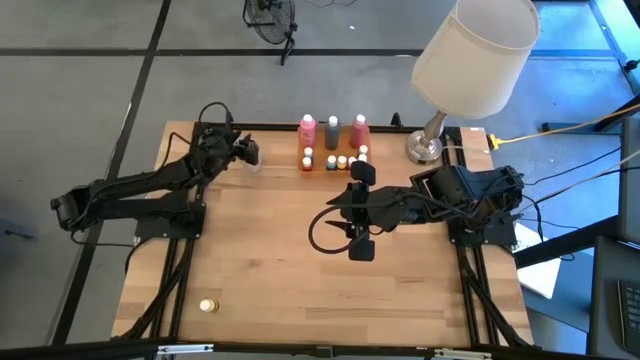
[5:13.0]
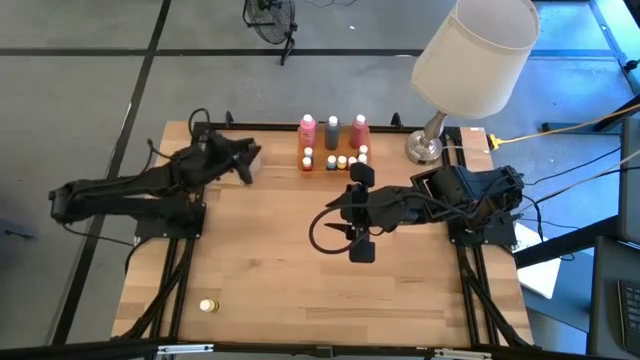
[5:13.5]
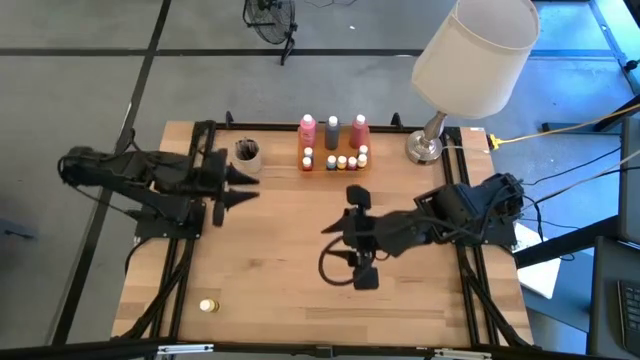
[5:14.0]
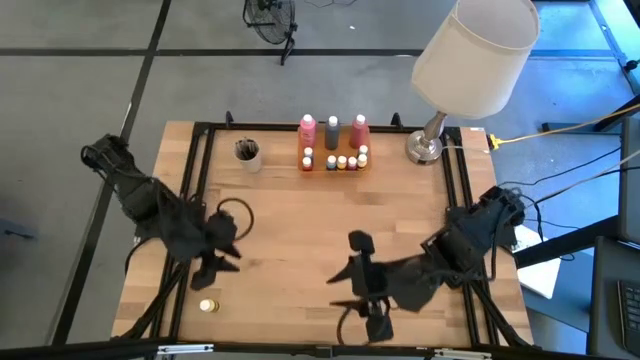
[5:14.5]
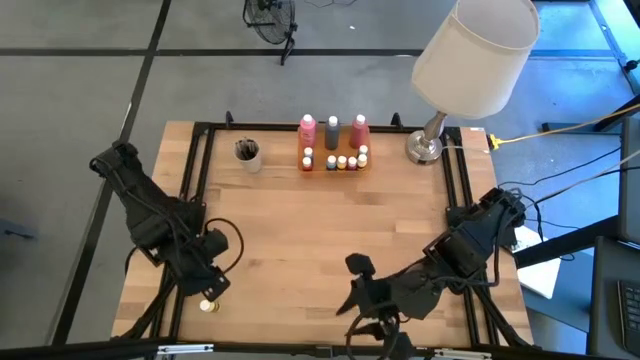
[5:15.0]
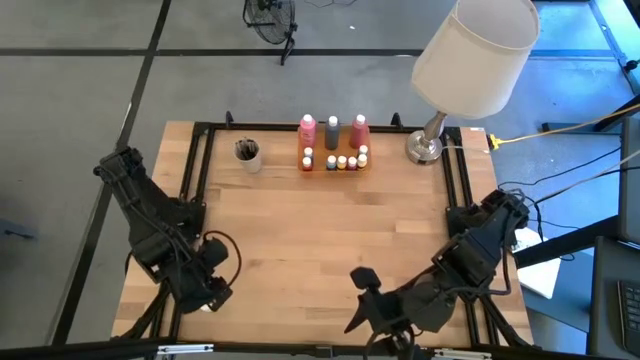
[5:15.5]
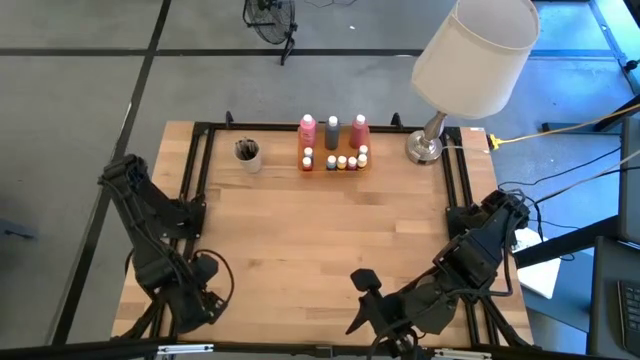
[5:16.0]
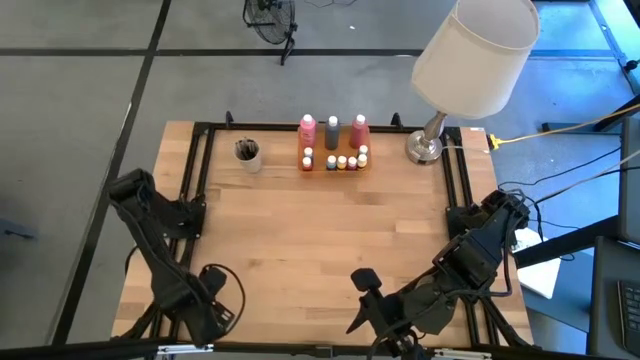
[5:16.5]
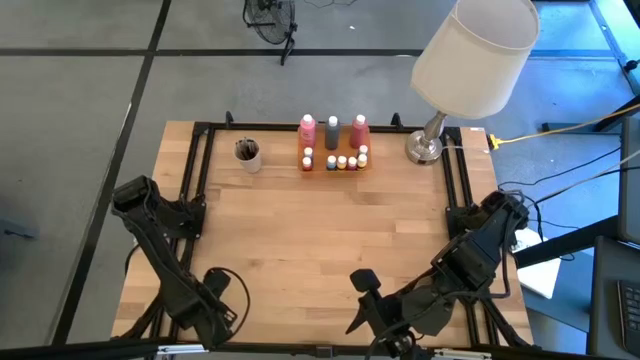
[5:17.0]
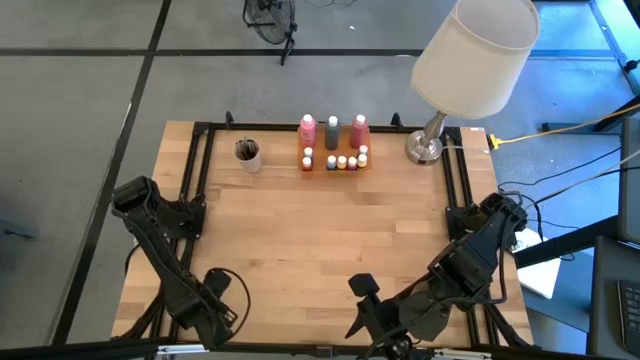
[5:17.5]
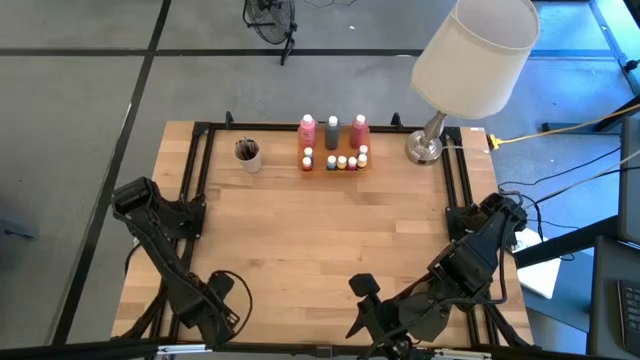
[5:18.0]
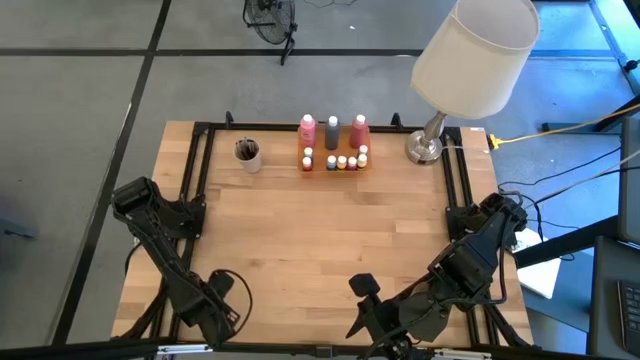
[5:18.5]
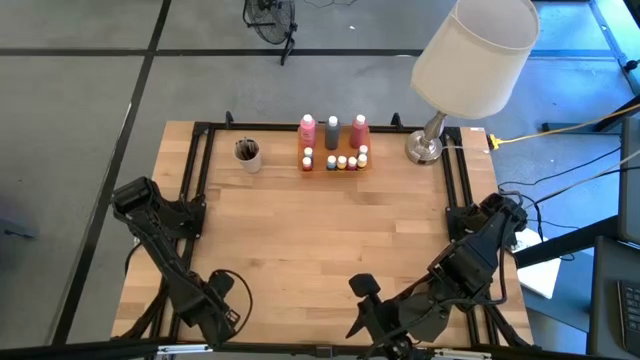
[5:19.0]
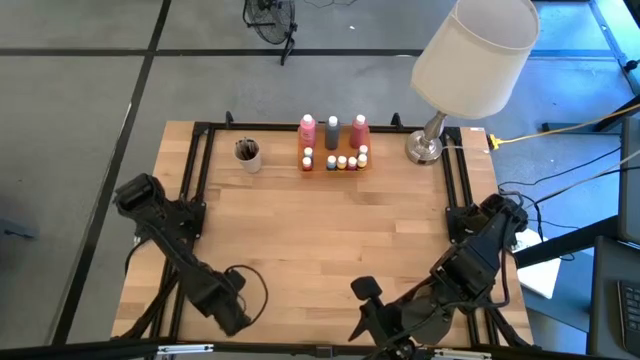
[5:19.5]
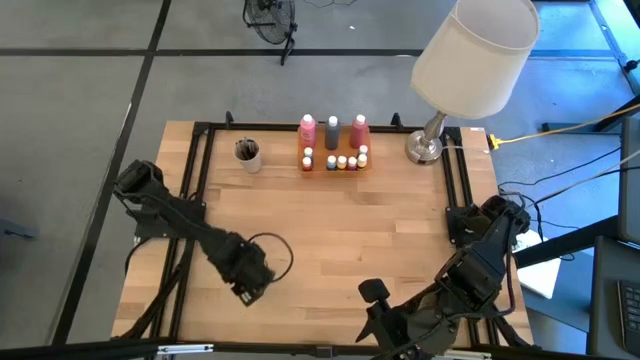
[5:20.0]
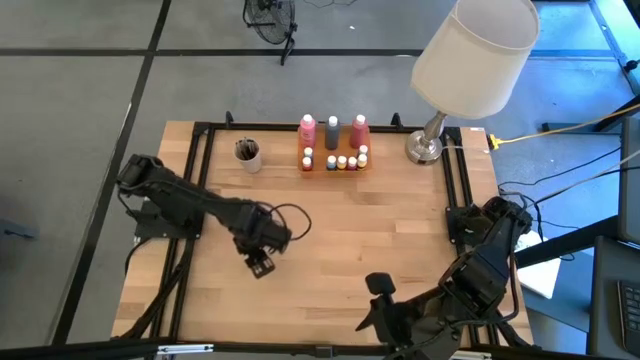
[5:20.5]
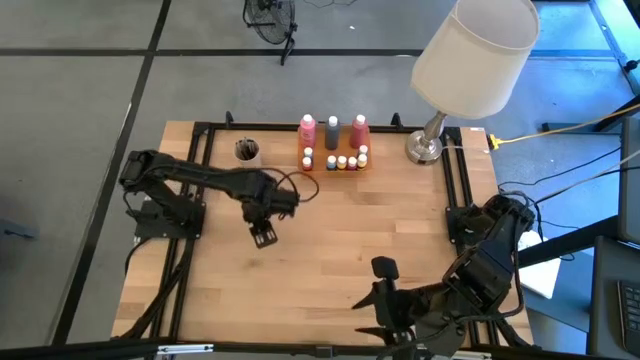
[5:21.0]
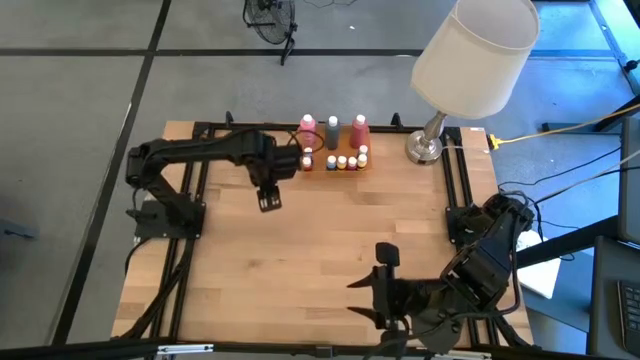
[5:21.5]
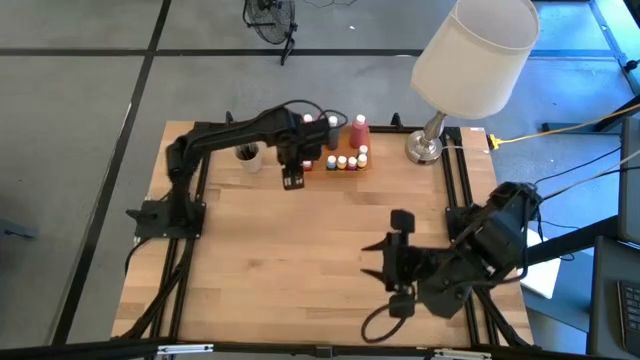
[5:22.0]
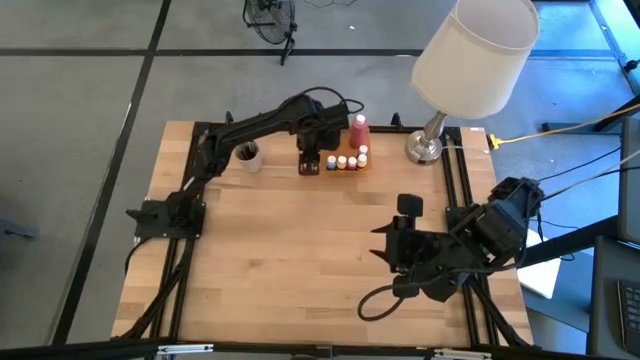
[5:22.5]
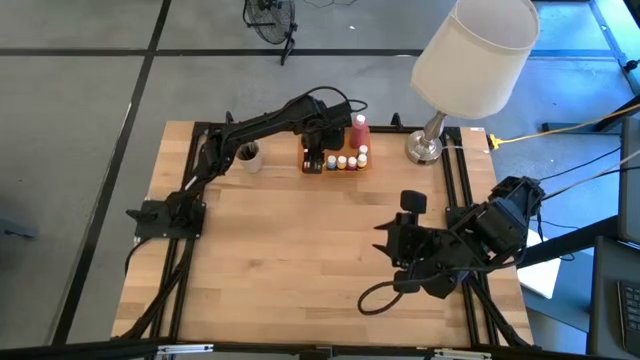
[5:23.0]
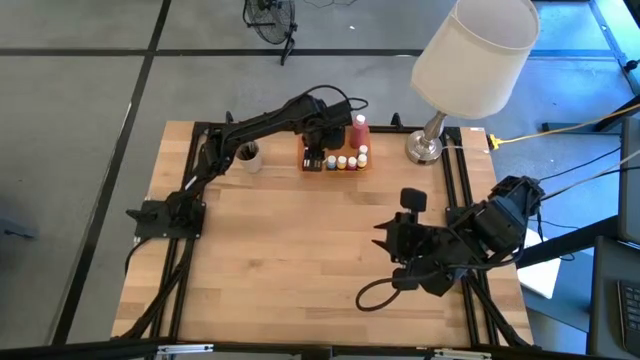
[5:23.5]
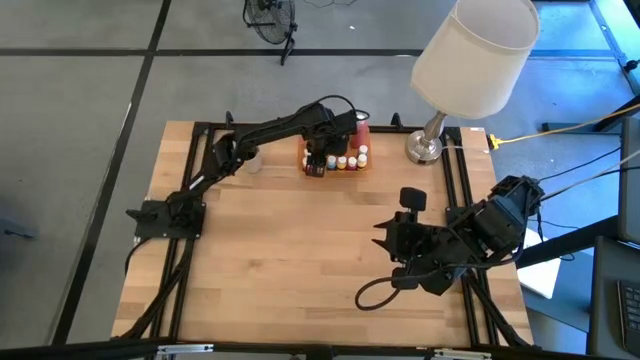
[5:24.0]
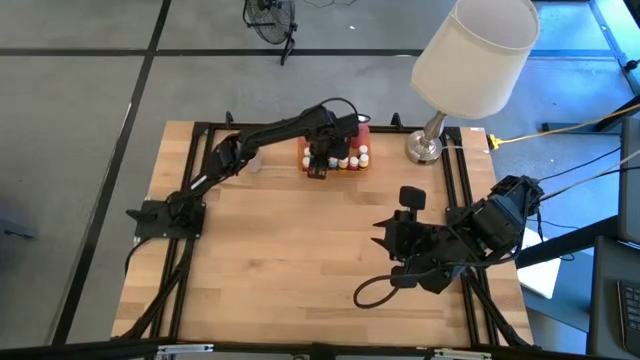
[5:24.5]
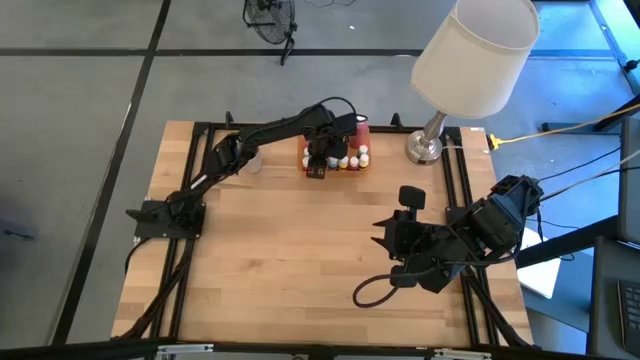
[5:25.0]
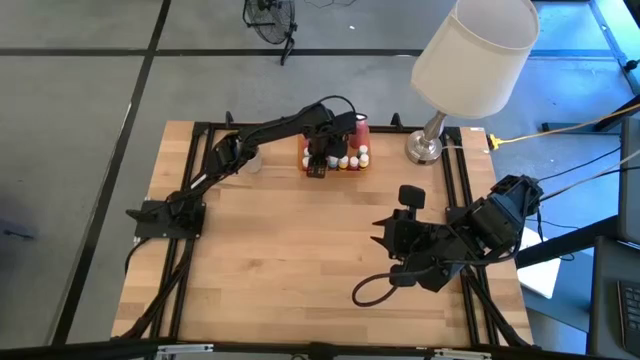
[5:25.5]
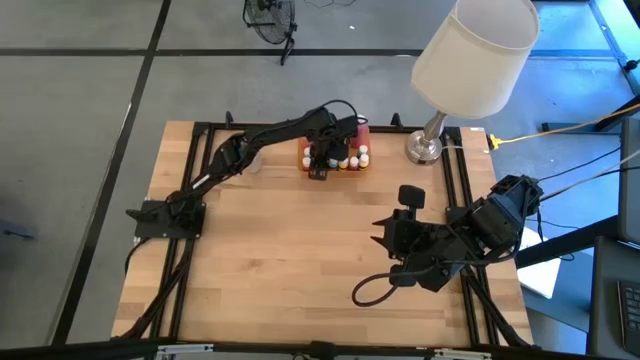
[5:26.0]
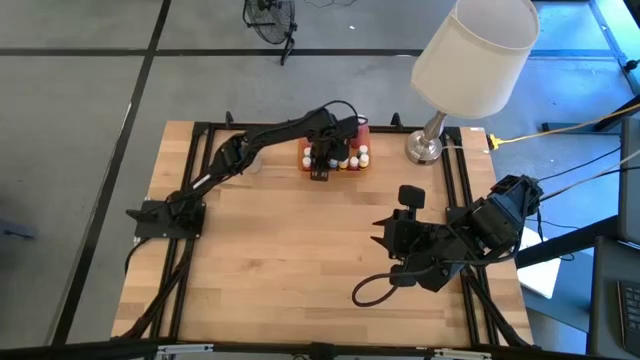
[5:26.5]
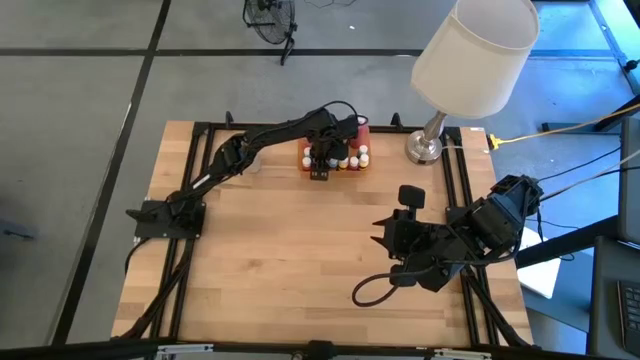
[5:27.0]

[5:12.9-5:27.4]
Task: Pick & Place Paint Supplies
Put the light yellow paint bottle into the orange bin

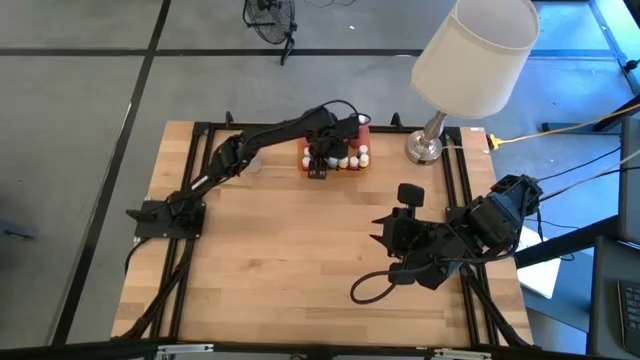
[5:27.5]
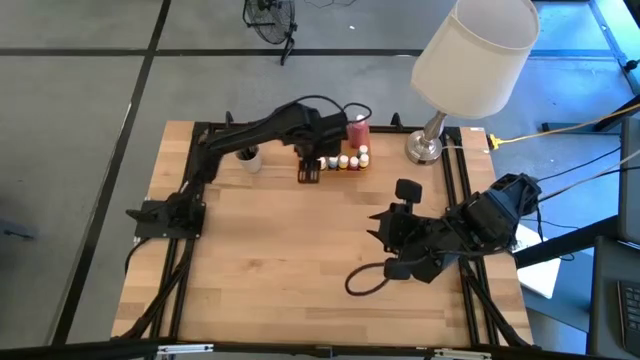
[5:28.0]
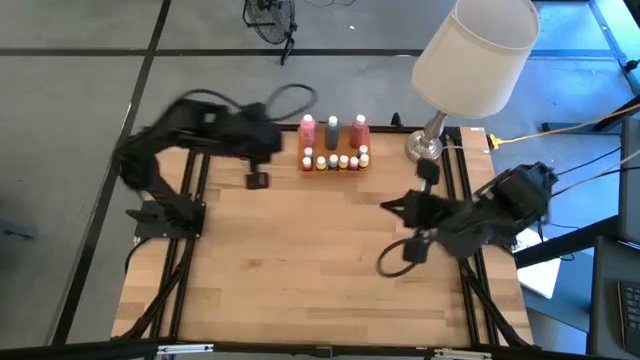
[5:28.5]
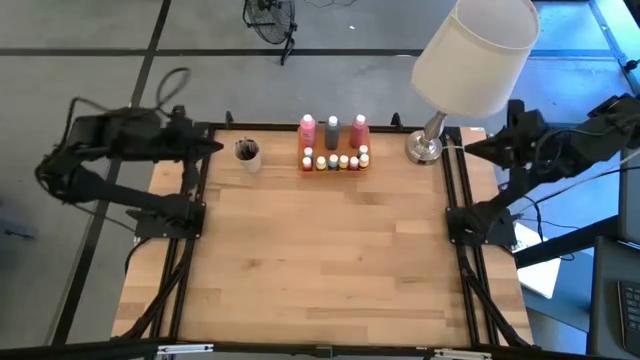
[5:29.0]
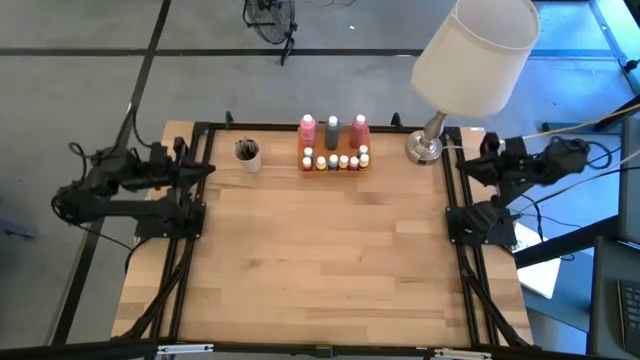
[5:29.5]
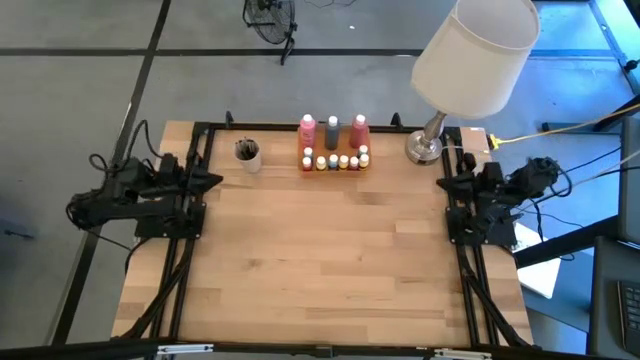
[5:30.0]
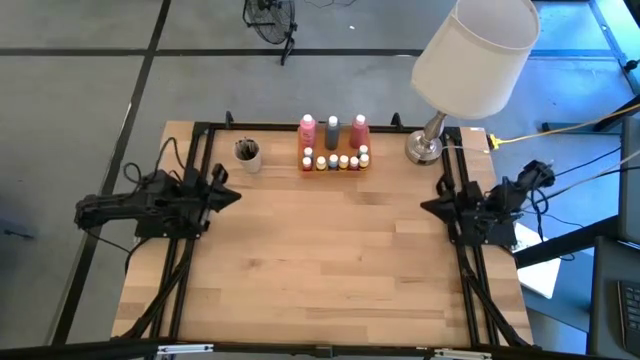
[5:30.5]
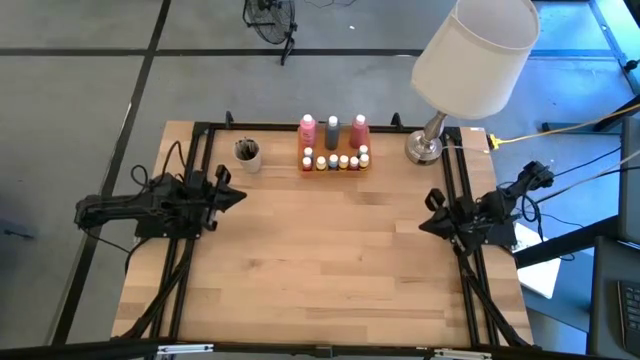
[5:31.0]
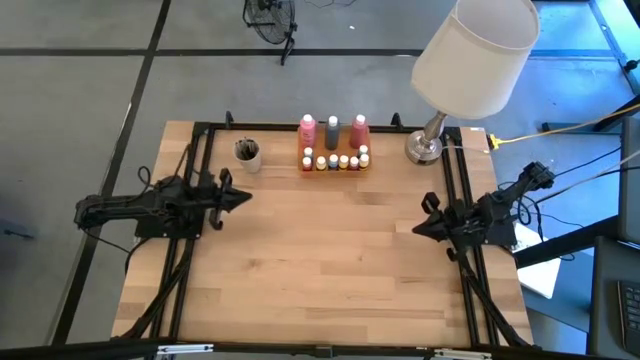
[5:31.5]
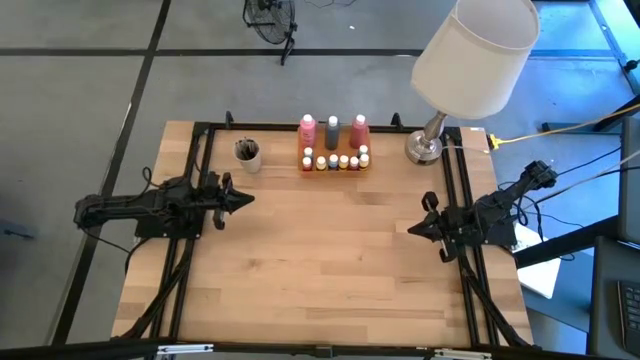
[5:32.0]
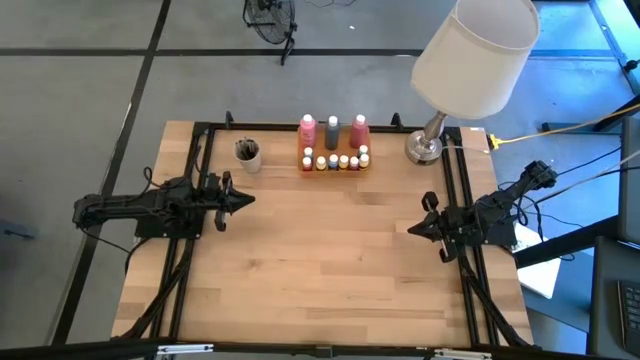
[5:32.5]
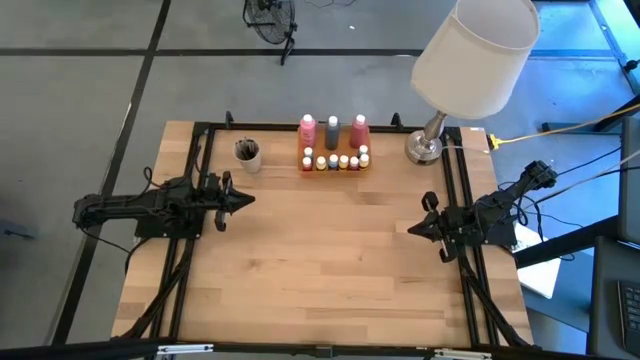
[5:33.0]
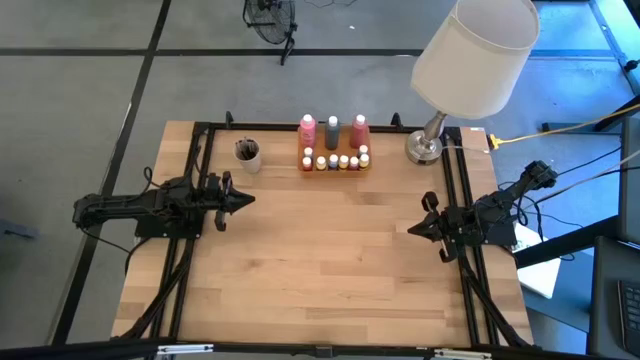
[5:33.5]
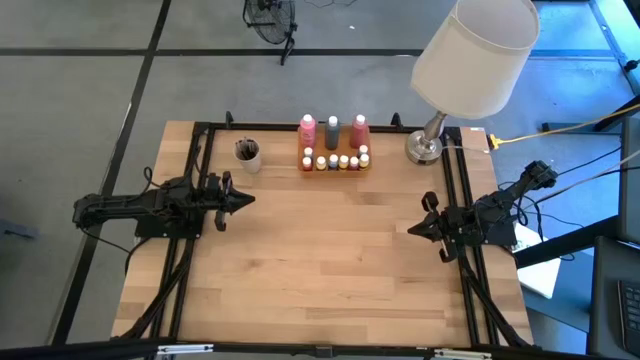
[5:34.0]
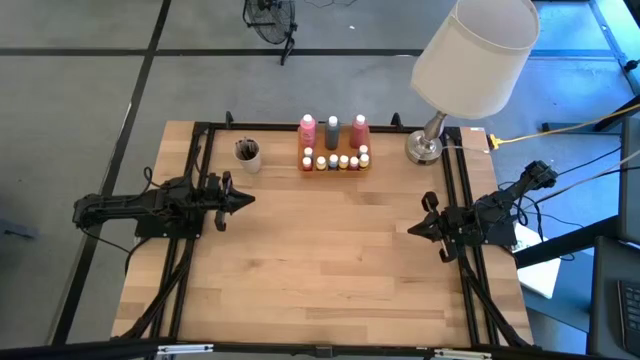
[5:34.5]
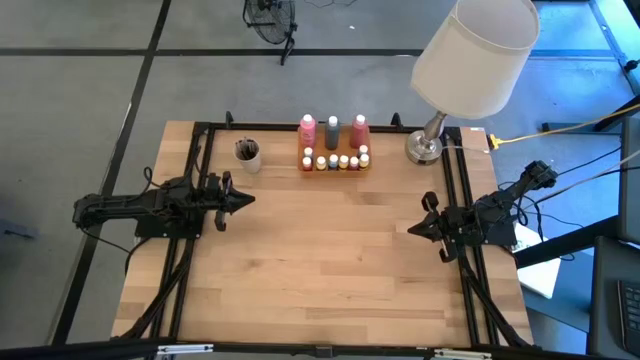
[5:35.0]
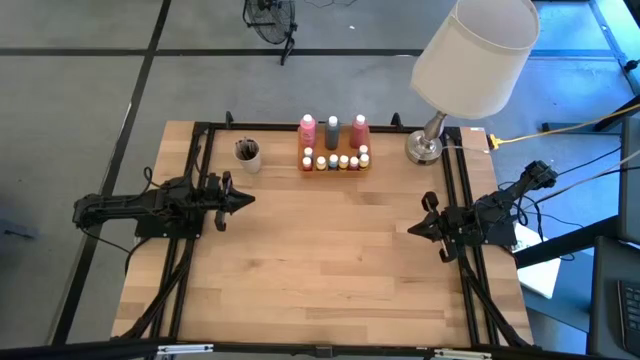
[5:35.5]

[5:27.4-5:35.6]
Return to Home Position
